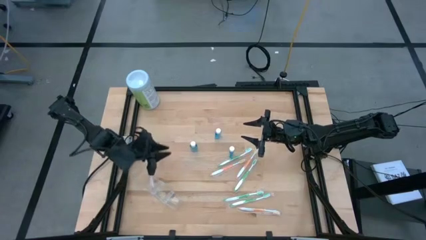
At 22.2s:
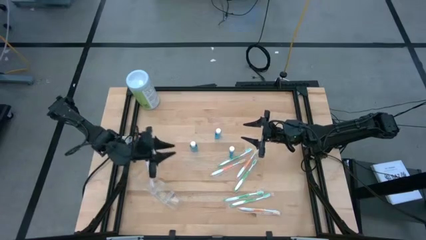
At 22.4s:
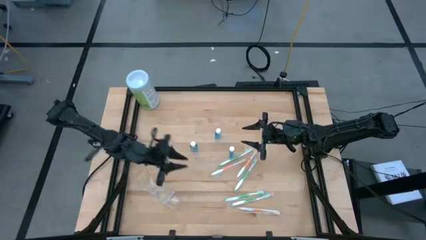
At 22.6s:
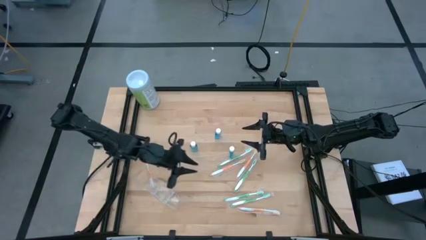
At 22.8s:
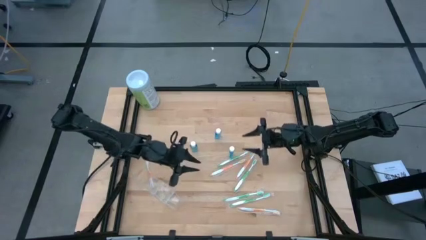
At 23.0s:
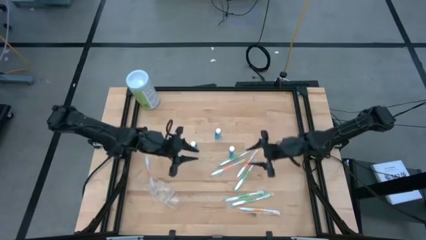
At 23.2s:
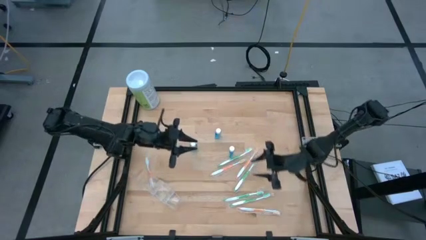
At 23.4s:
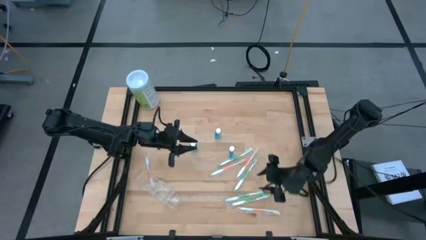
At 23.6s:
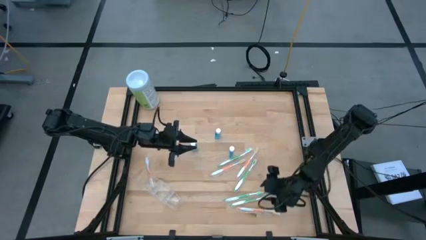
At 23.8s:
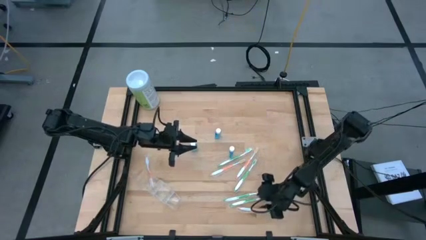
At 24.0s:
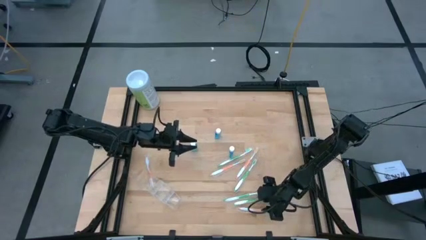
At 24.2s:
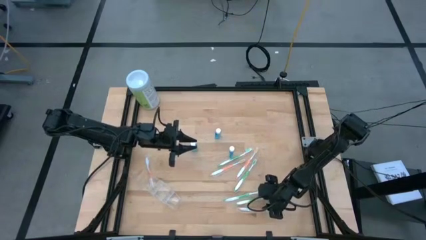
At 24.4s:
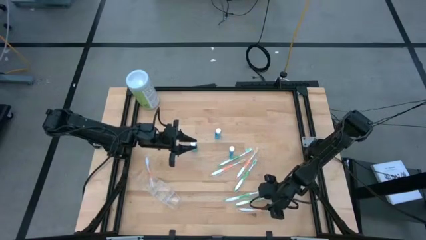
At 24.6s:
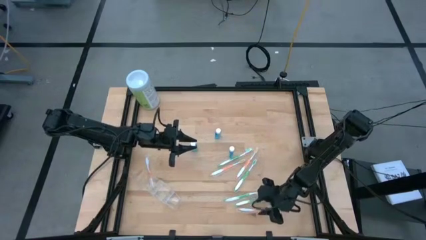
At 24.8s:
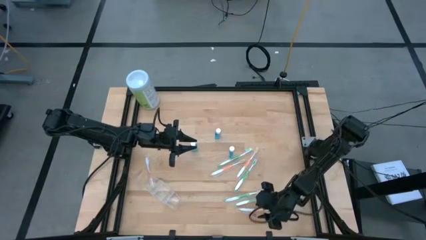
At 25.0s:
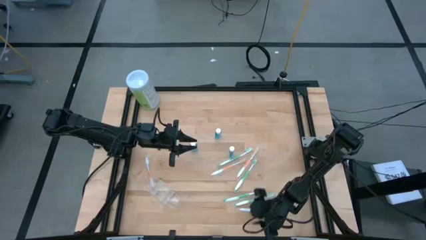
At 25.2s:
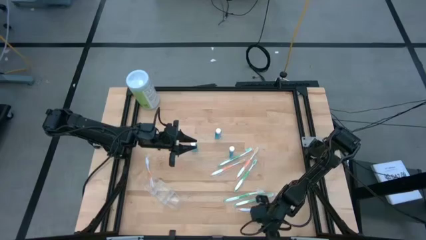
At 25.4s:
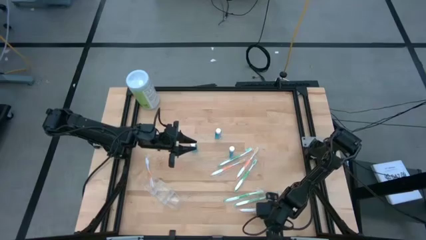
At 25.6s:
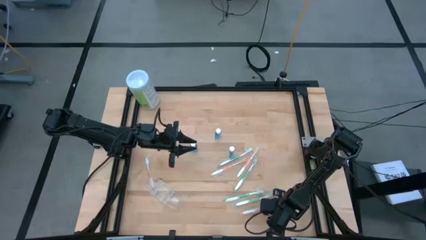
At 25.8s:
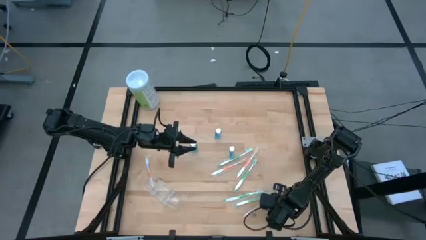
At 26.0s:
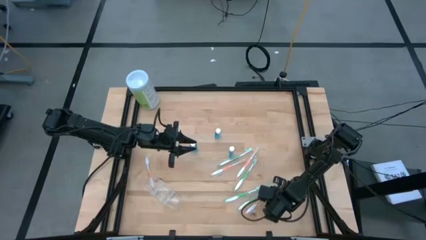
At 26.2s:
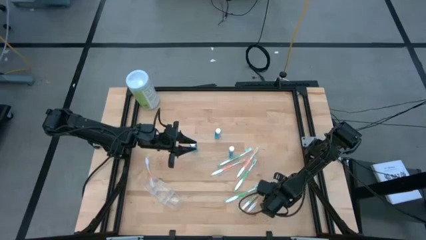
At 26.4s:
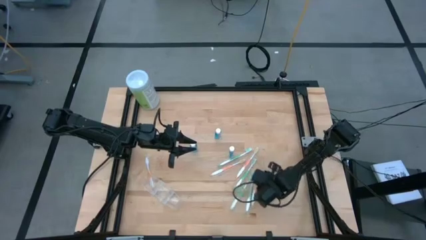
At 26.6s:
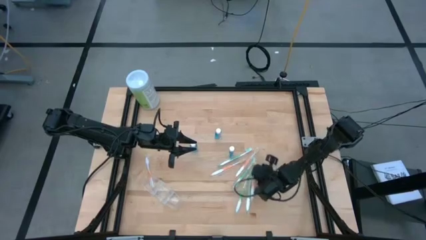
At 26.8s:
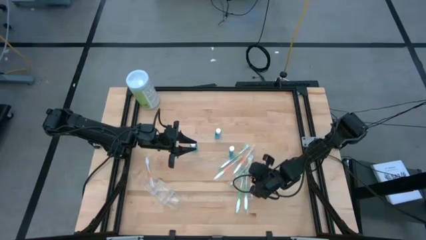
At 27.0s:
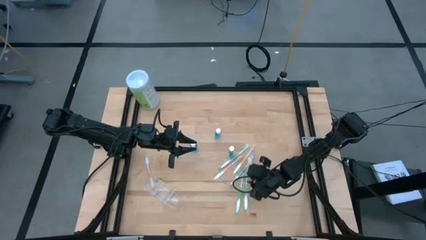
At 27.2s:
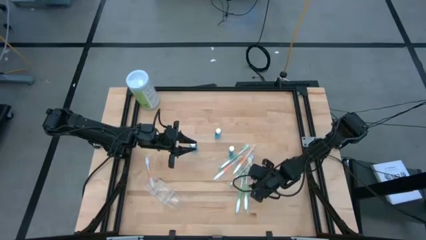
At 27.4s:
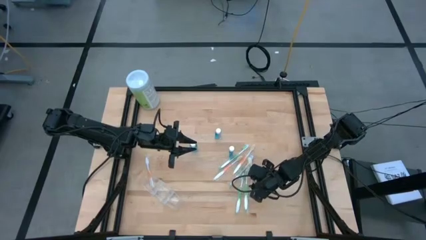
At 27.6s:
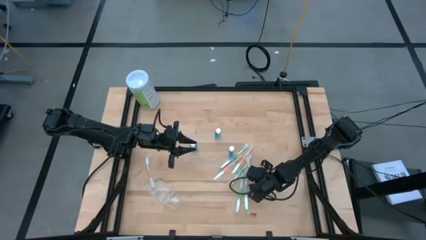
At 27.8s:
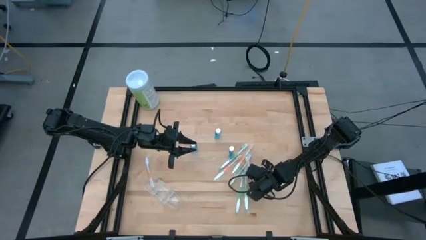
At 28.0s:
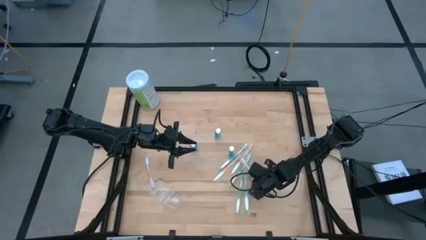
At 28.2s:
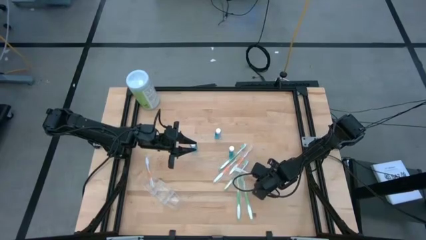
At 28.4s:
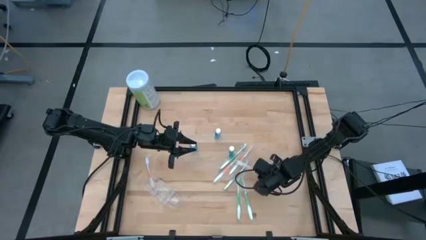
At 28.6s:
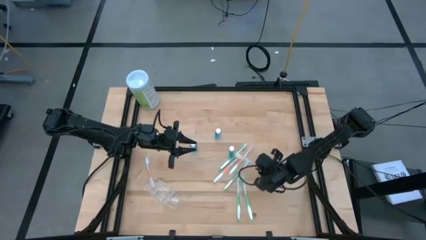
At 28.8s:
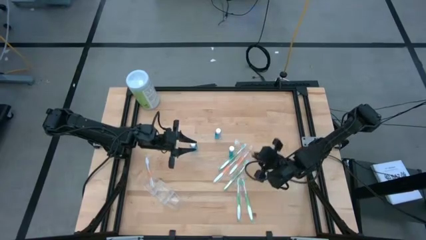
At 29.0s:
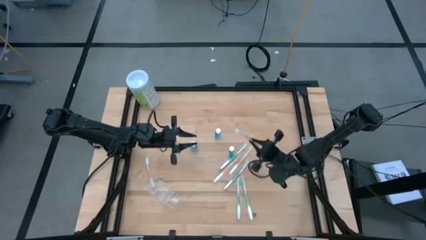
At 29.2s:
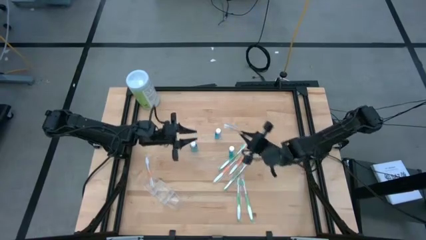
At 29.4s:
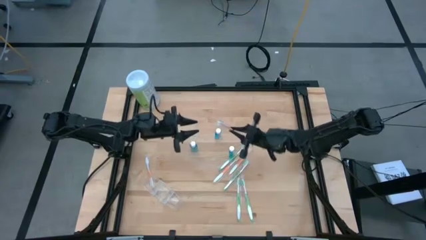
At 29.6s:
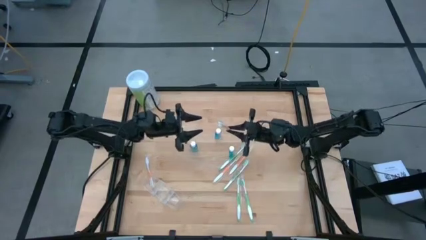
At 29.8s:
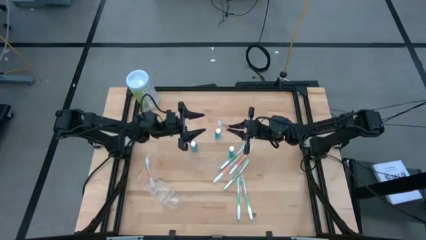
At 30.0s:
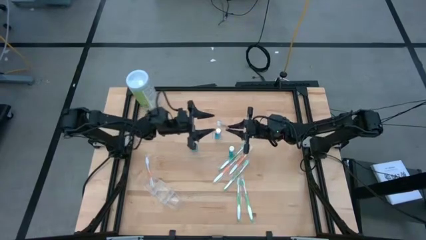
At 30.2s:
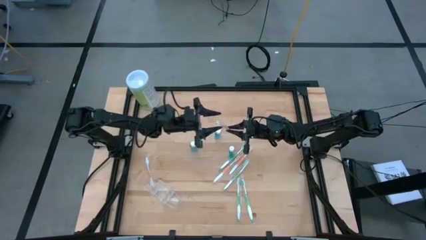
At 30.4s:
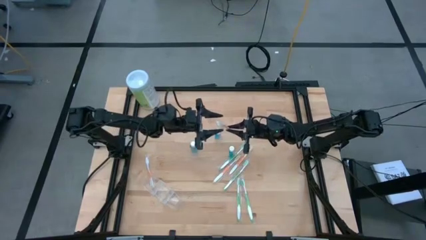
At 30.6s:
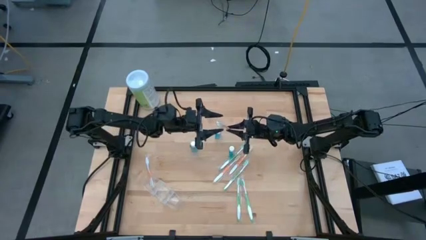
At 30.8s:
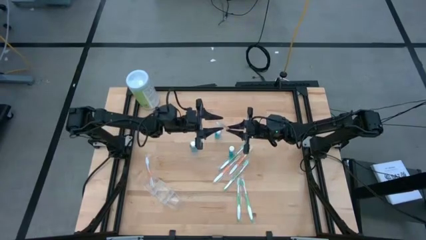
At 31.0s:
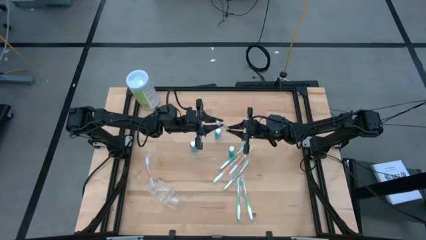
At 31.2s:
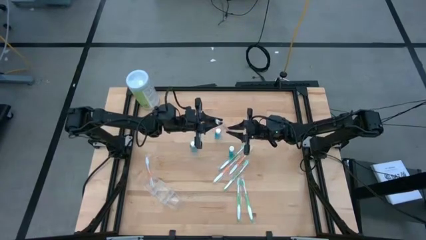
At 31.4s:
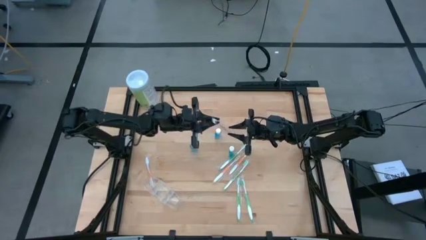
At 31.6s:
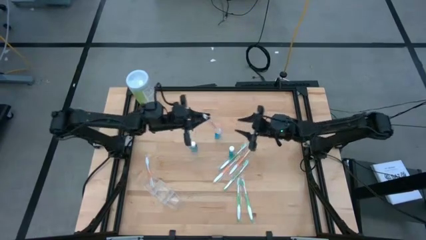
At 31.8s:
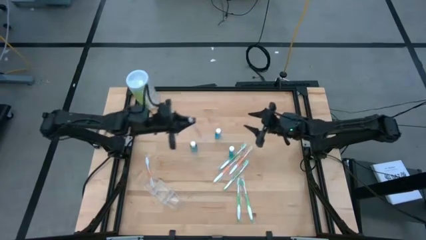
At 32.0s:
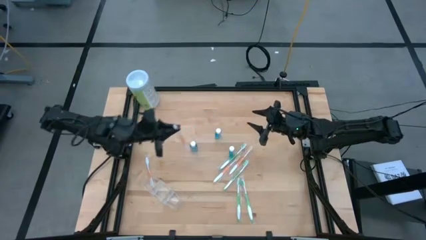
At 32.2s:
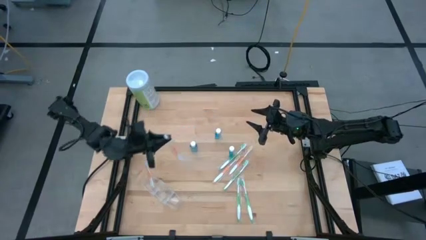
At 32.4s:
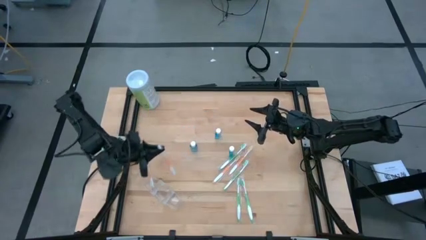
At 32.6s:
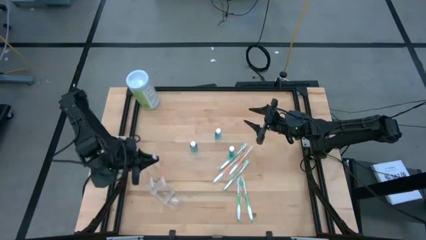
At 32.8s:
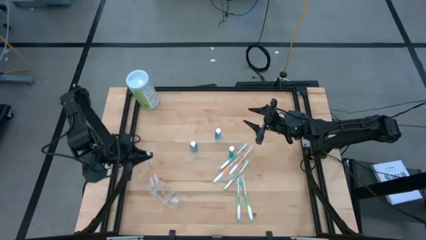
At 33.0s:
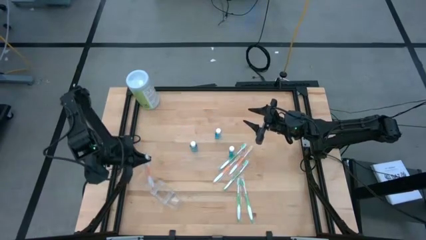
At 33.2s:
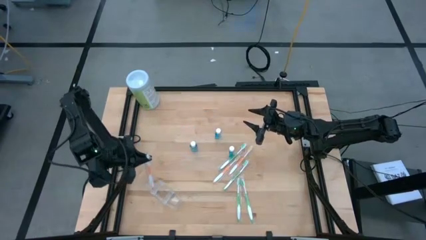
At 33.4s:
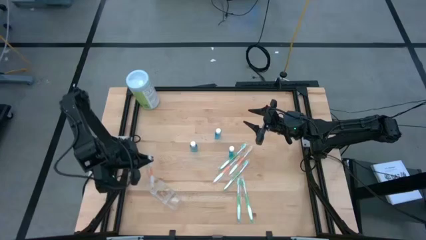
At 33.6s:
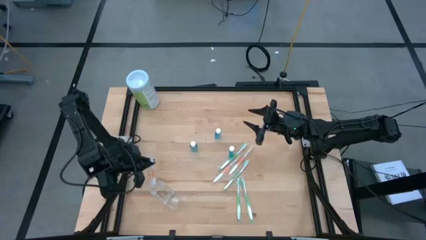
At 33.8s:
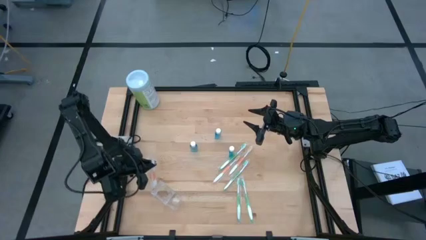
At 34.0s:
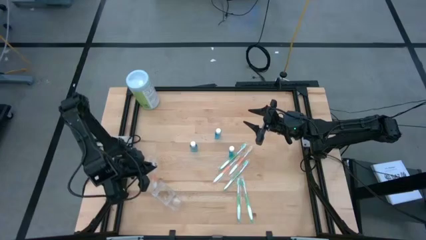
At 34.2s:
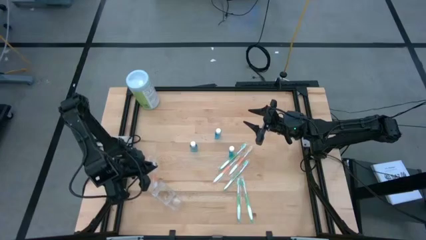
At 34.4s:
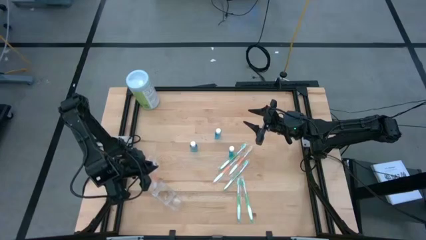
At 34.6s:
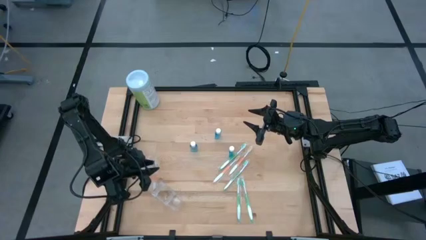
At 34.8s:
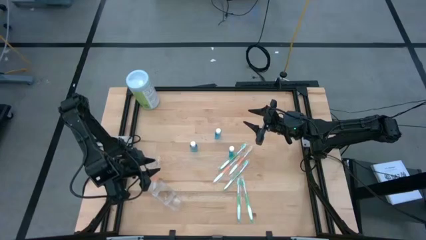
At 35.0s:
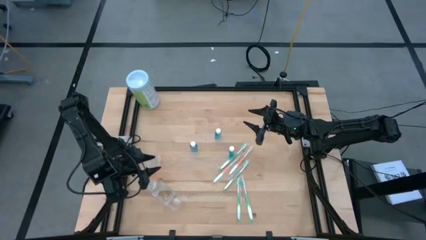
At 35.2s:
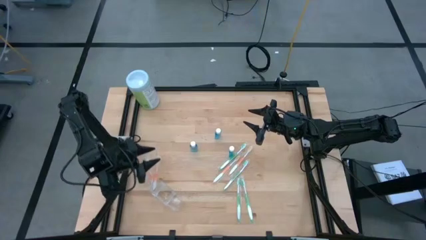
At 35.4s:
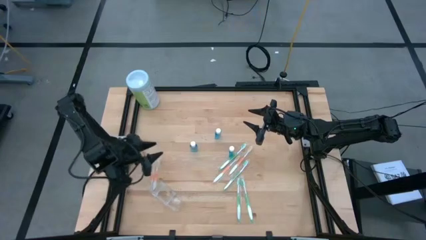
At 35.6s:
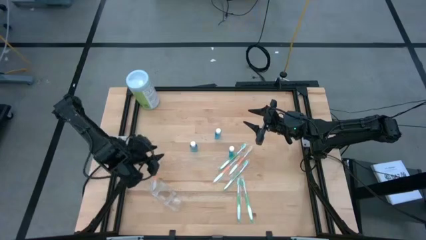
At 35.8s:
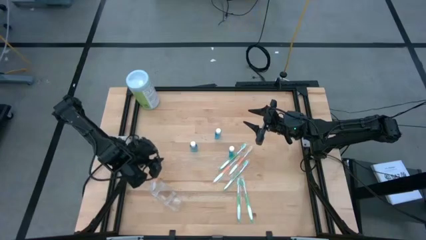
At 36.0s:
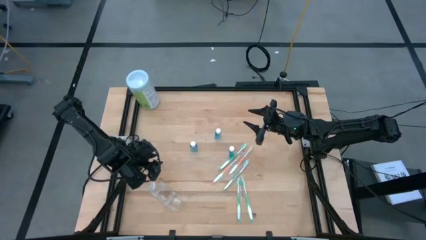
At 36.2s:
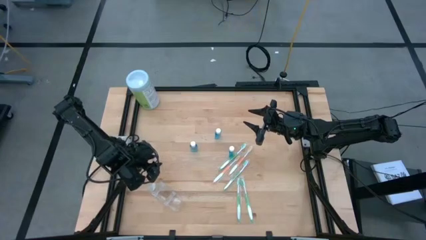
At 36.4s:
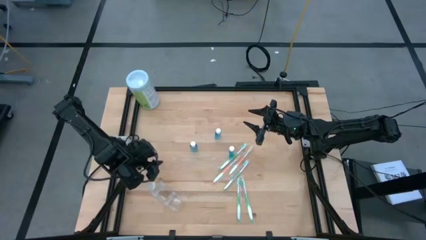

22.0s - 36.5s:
Task: Pick & Place toothbrushing station
Put the orange toothbrush into the transparent organizer
